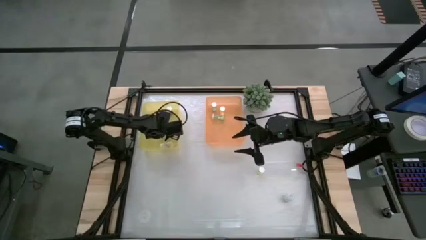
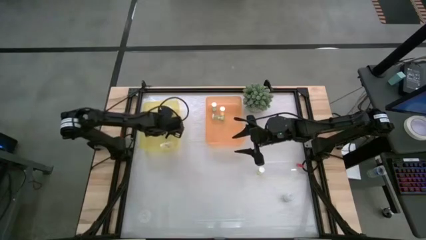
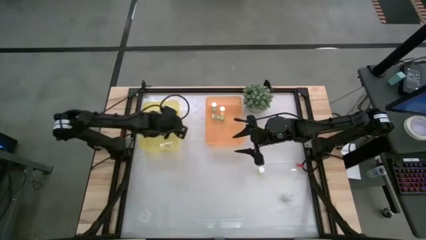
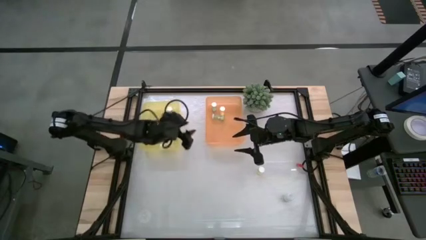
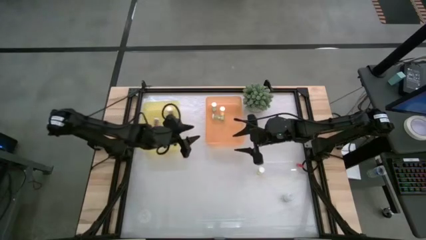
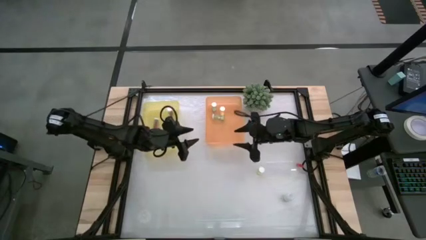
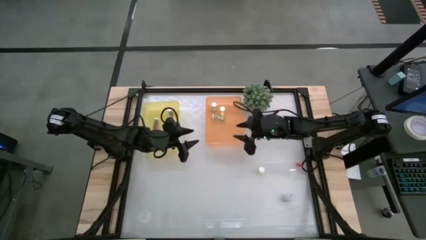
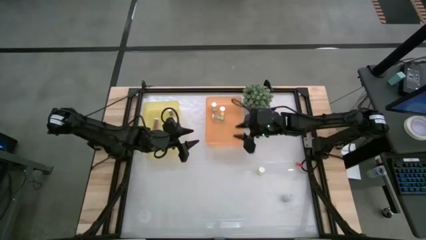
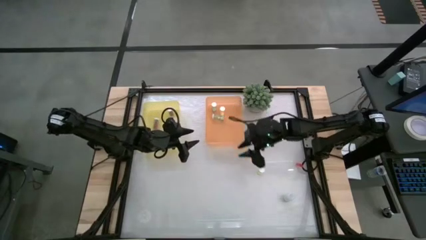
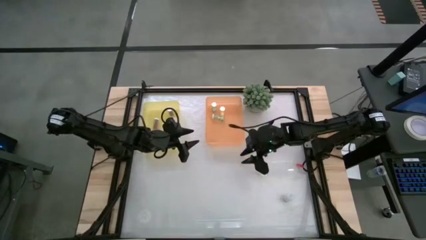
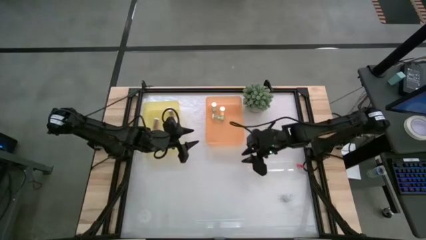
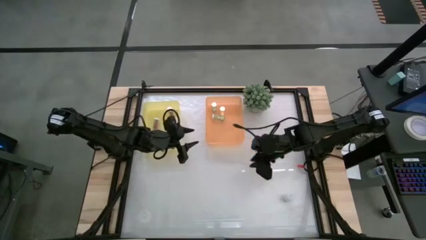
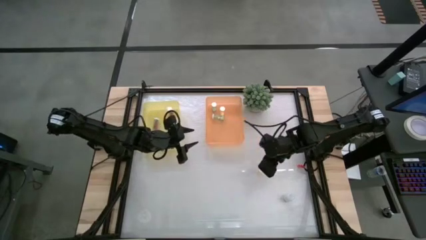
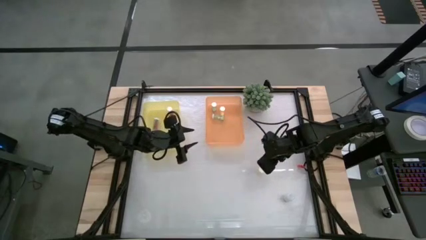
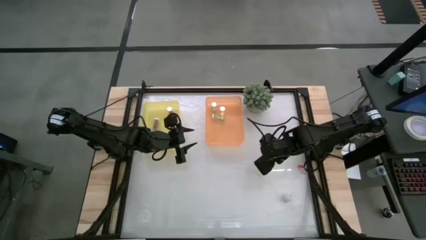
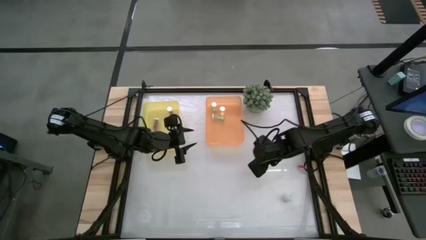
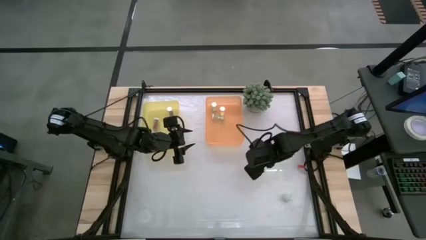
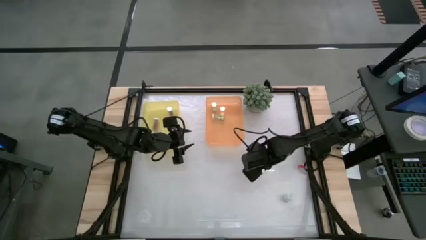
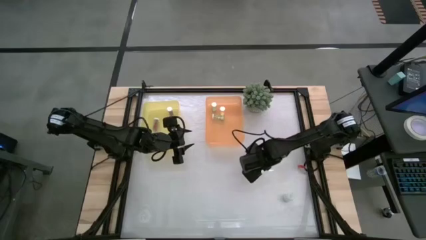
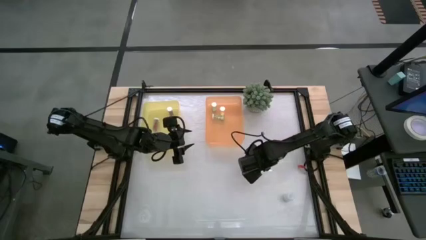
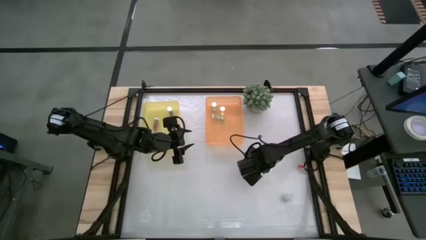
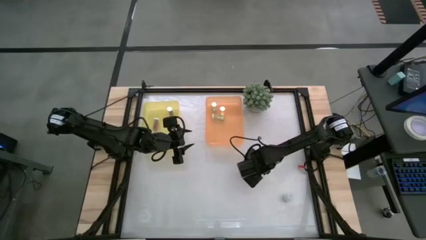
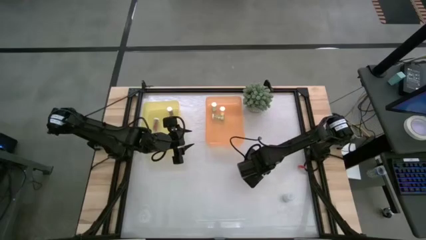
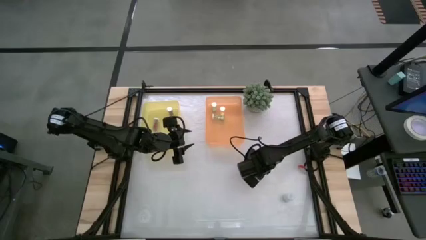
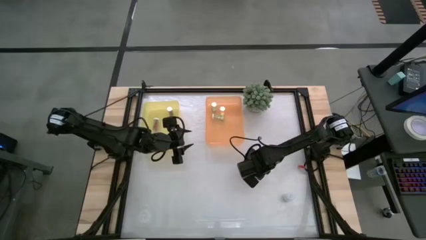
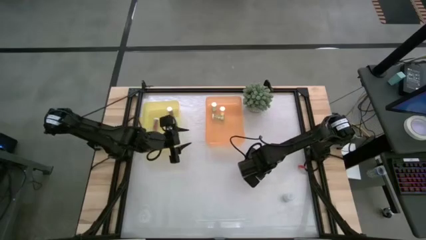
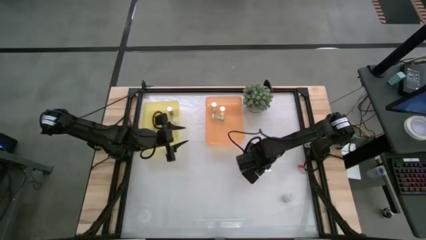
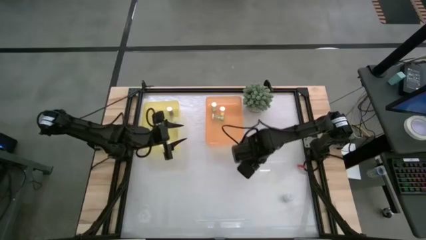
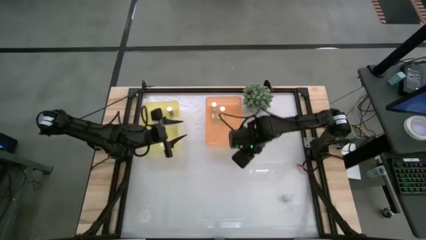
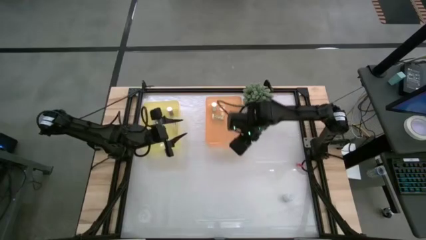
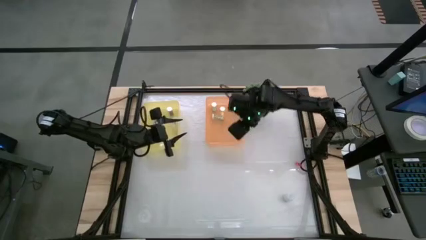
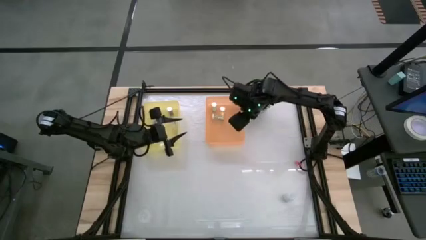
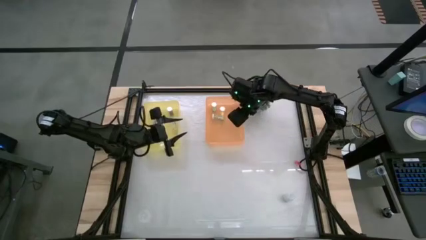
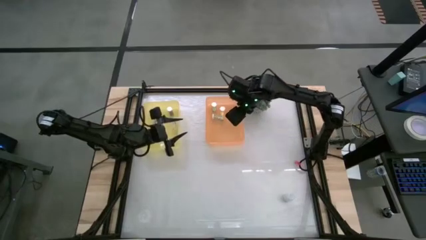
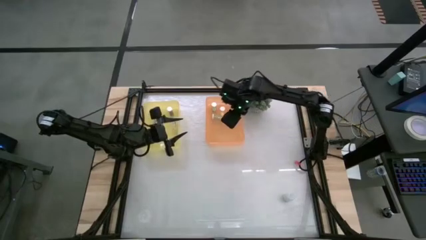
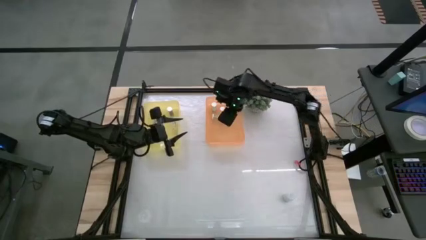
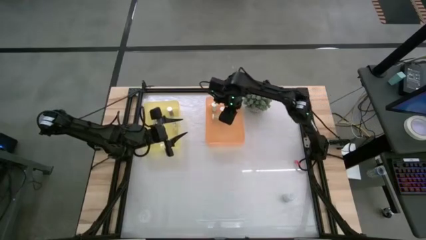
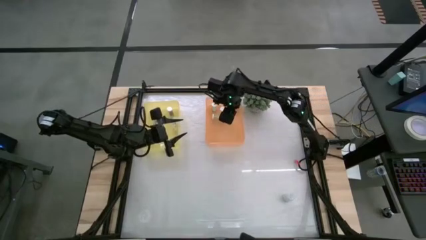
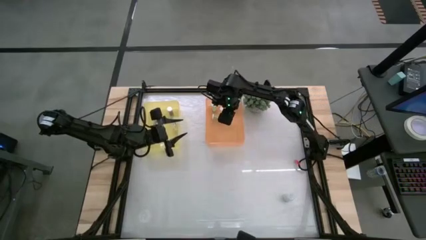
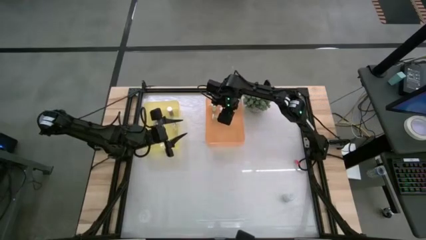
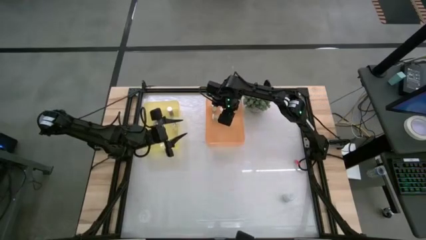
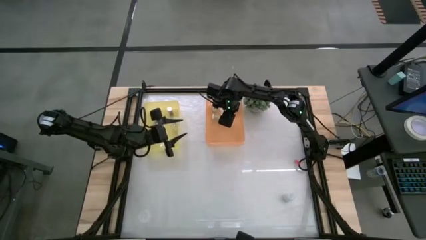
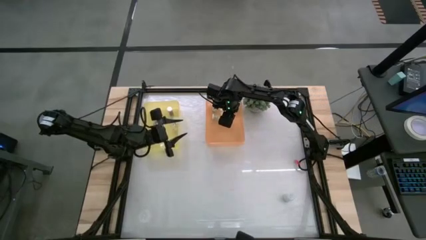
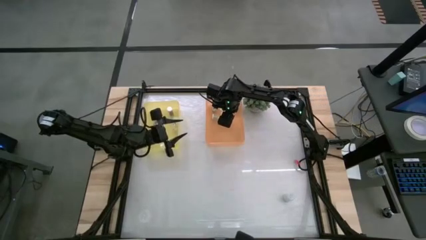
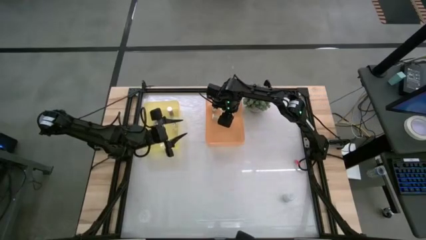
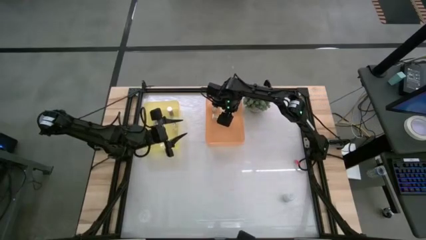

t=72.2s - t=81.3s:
Task: Pick and place medicine bottles into bin by pill shape (circle, oval)
Put the yellow tablet bottle into the orange bin

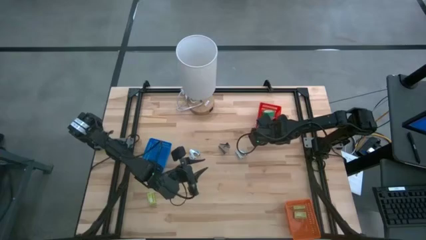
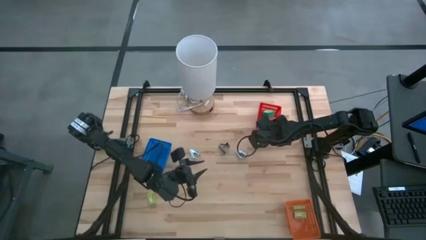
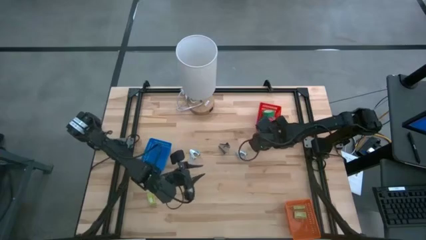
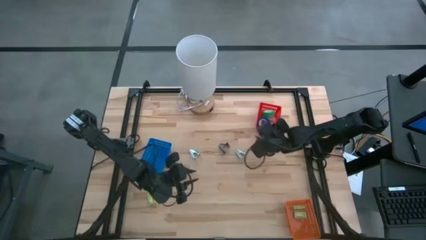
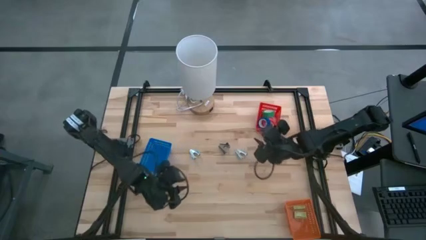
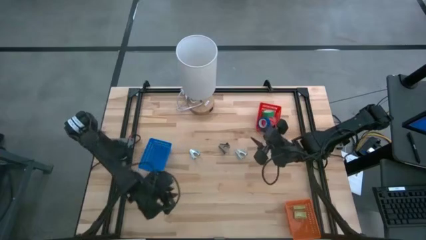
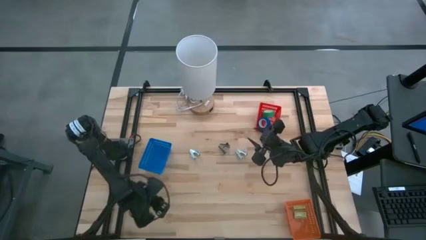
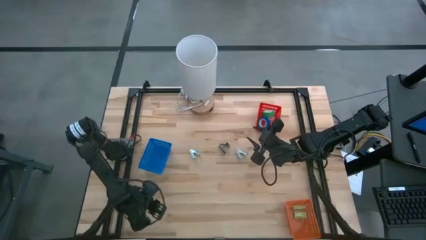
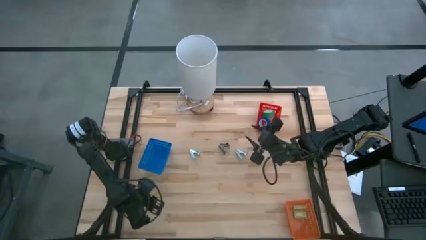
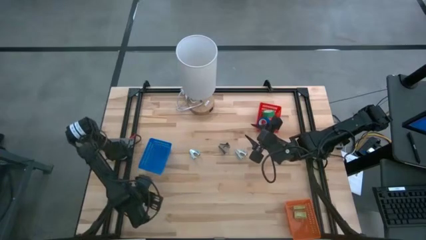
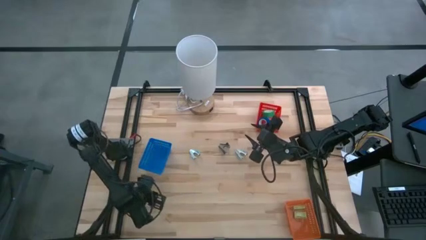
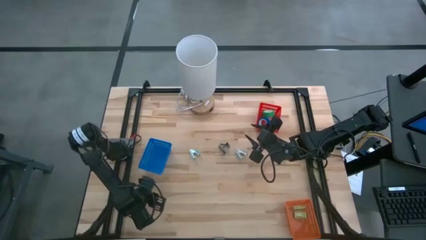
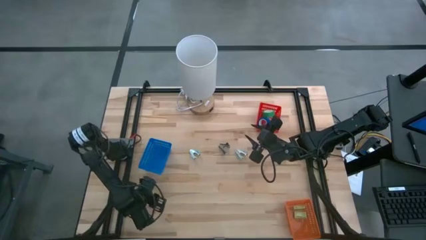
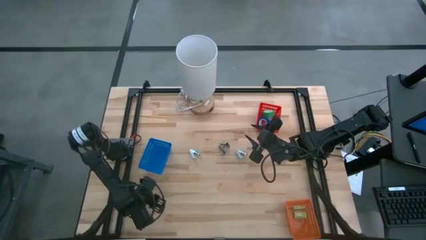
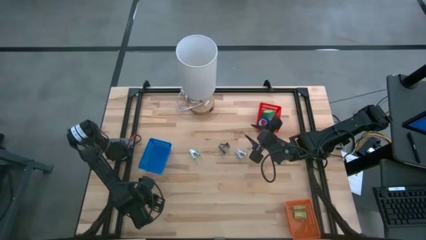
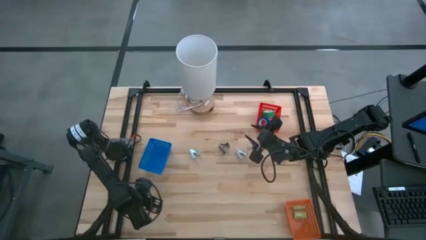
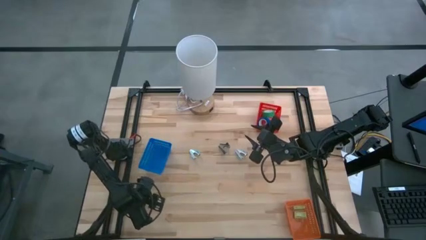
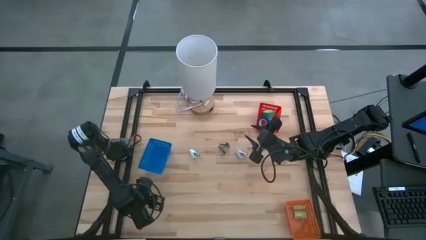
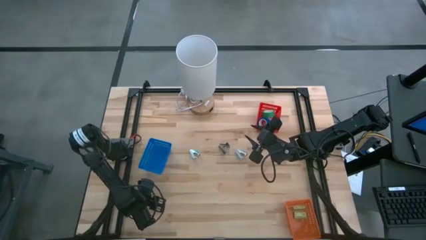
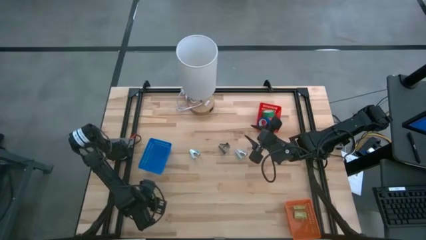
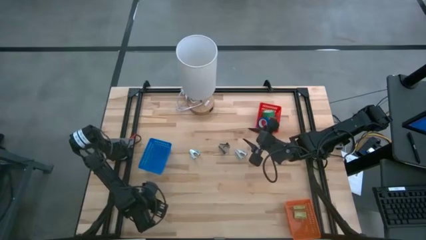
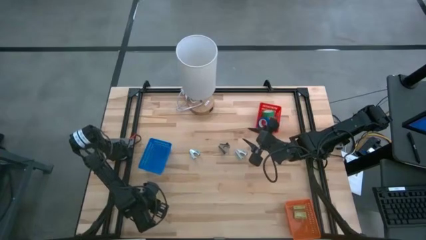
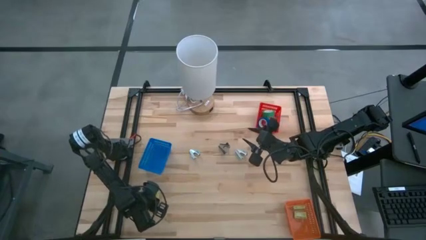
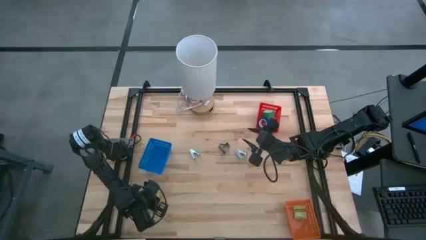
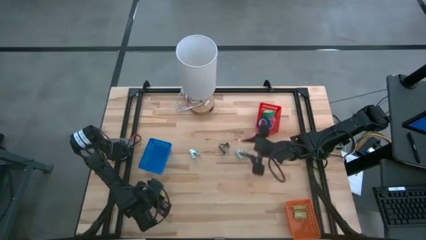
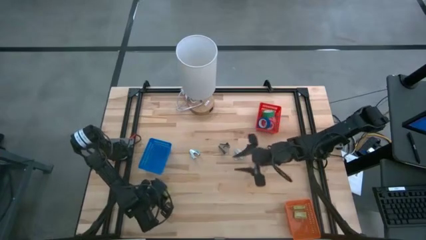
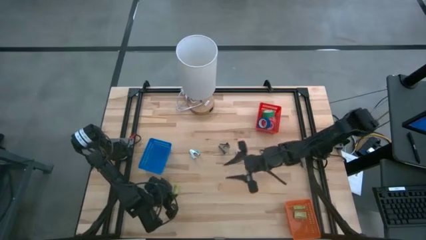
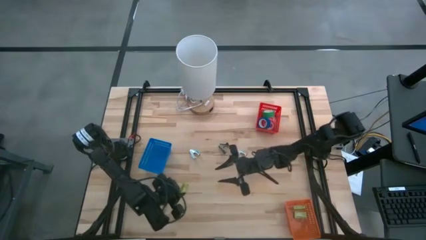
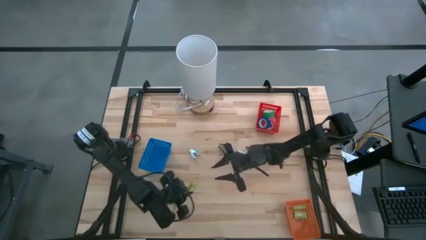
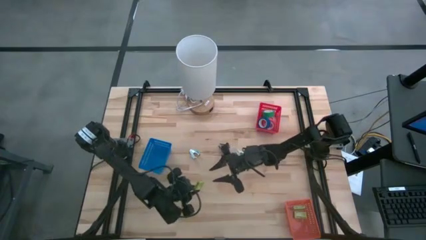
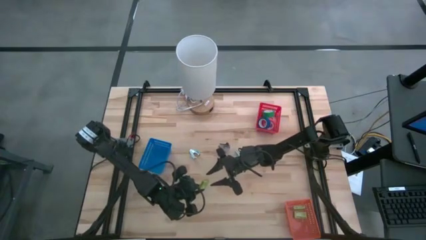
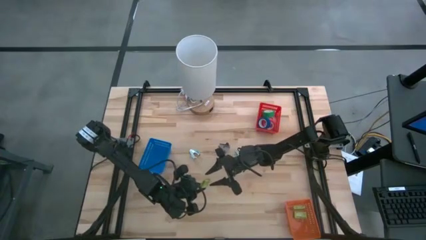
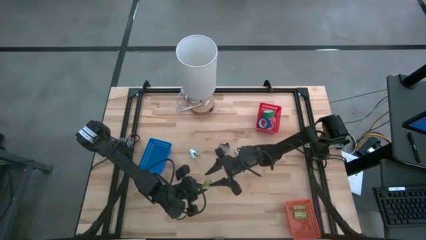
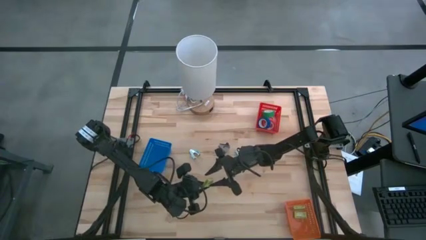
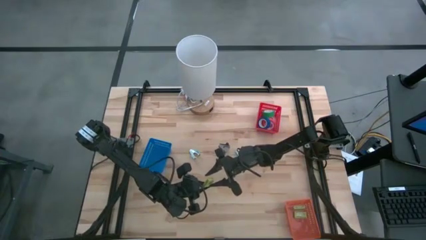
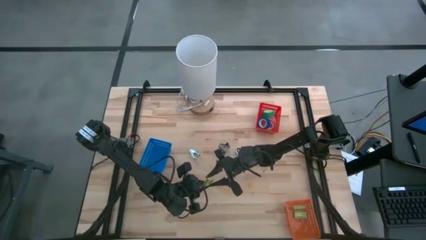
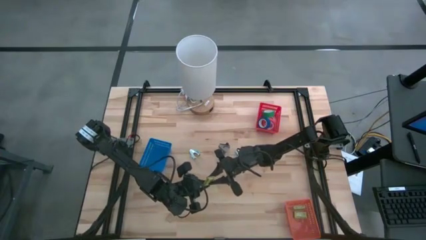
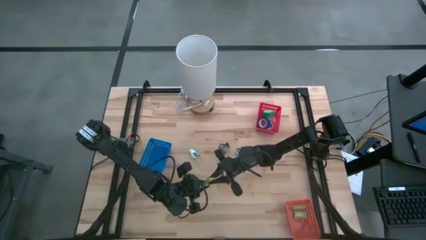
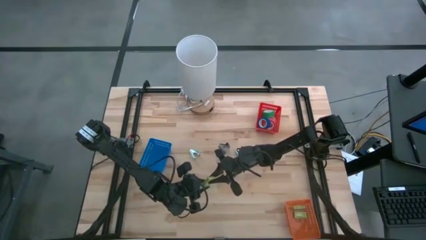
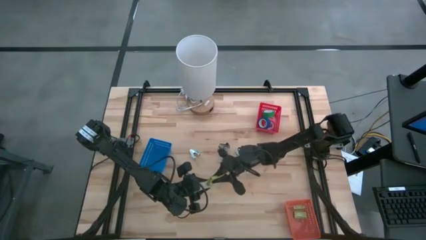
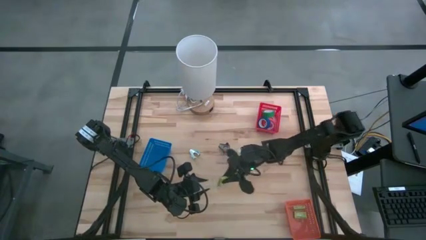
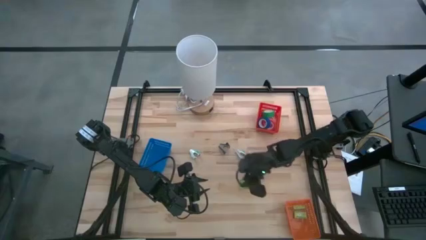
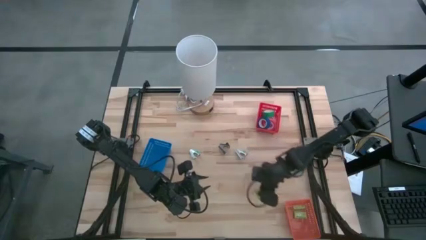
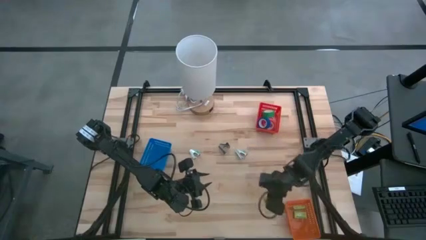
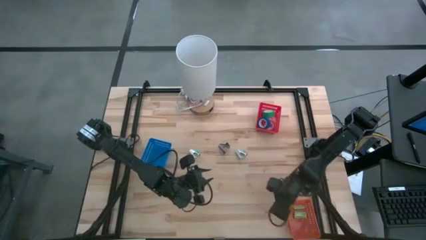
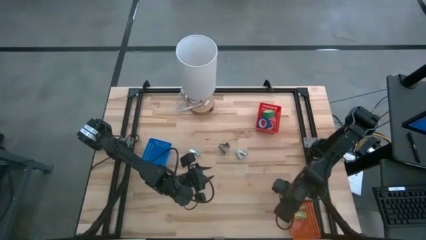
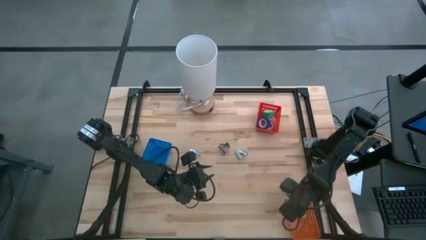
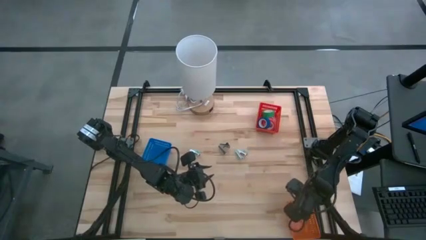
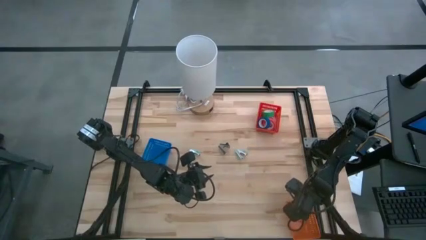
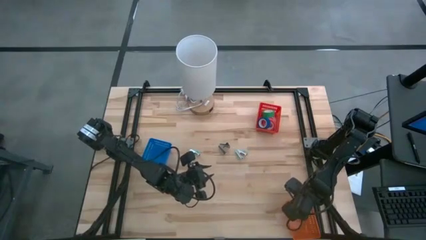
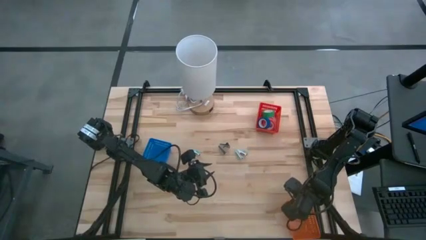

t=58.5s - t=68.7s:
Task: Pick and place Stapler, Stapler remover, tape
Put the staples box into the orange bin
